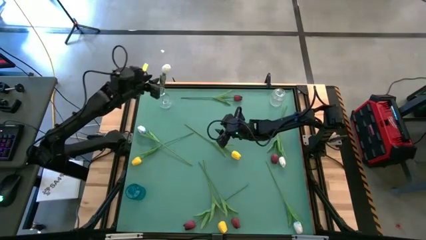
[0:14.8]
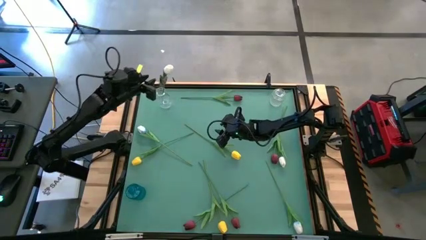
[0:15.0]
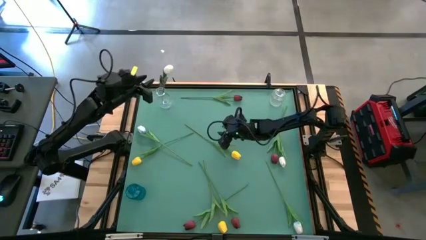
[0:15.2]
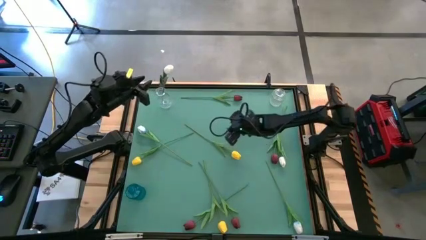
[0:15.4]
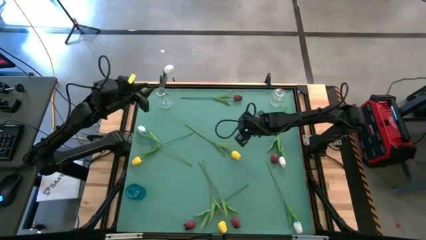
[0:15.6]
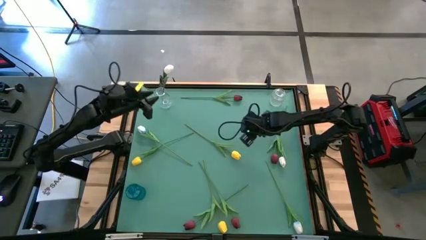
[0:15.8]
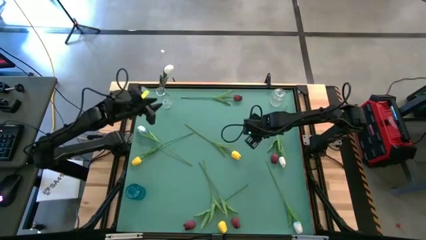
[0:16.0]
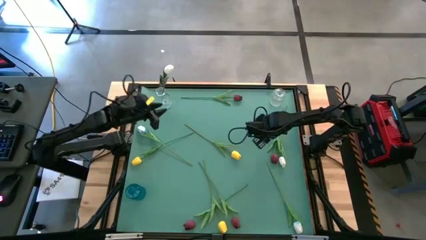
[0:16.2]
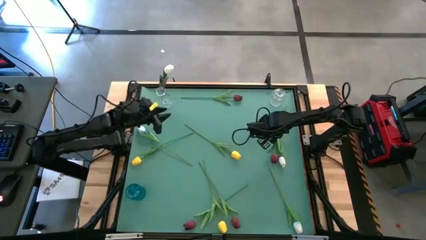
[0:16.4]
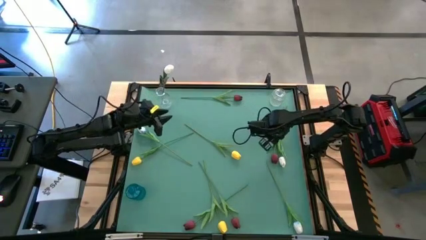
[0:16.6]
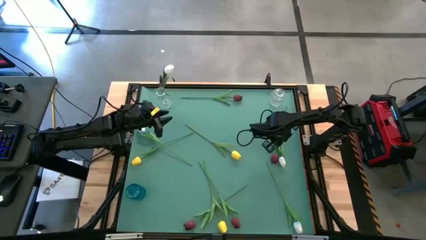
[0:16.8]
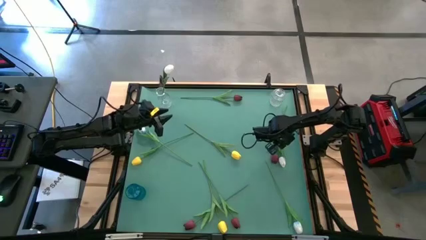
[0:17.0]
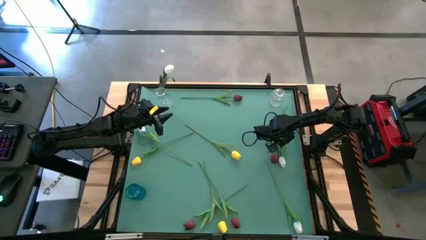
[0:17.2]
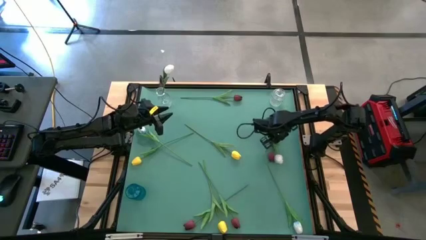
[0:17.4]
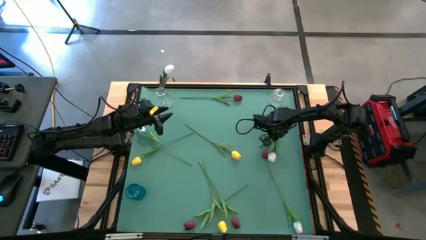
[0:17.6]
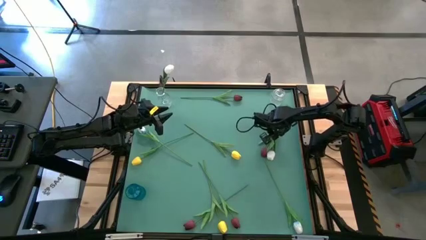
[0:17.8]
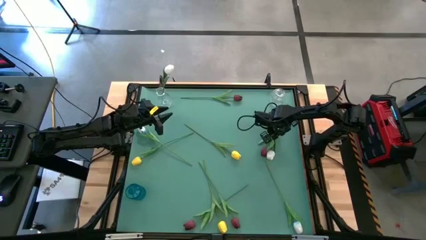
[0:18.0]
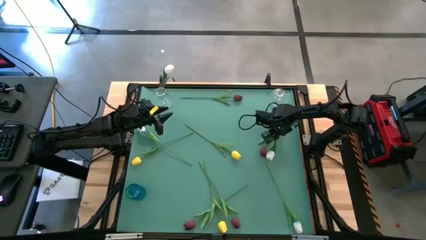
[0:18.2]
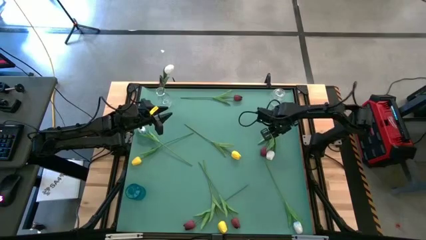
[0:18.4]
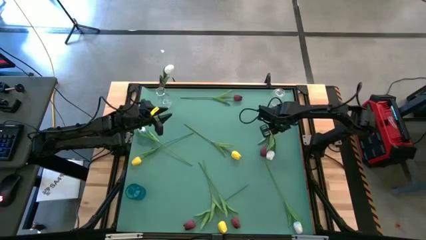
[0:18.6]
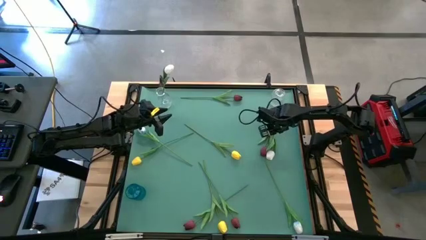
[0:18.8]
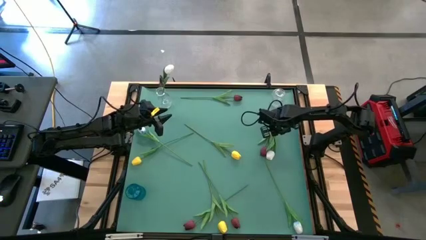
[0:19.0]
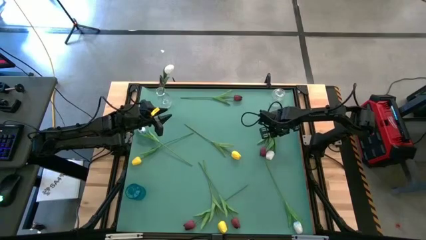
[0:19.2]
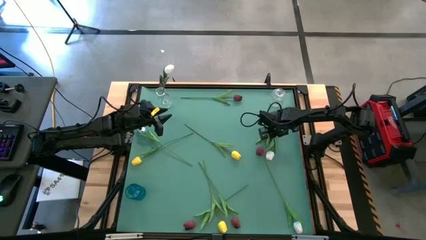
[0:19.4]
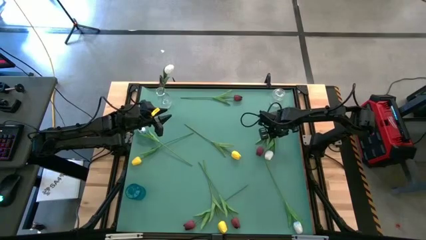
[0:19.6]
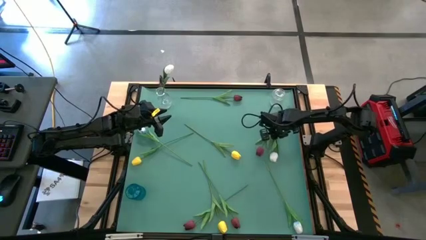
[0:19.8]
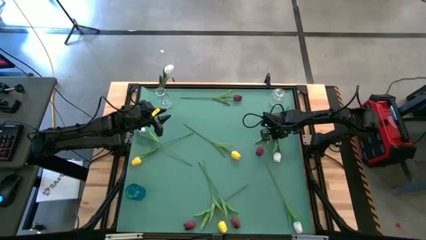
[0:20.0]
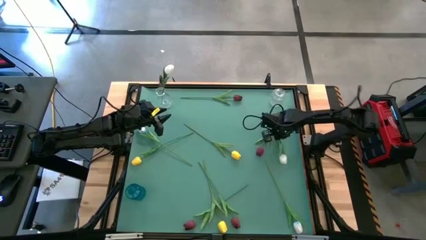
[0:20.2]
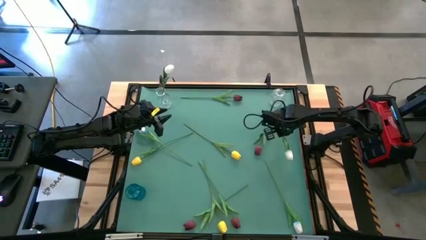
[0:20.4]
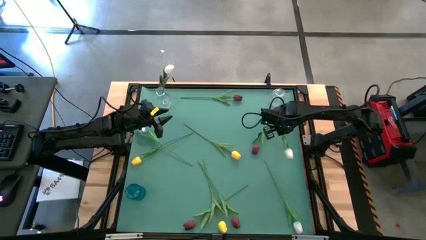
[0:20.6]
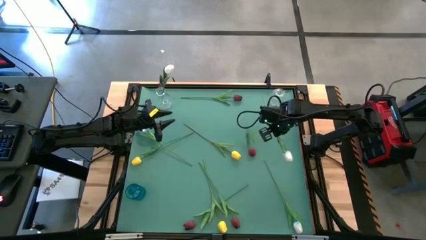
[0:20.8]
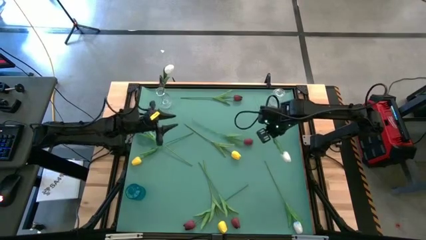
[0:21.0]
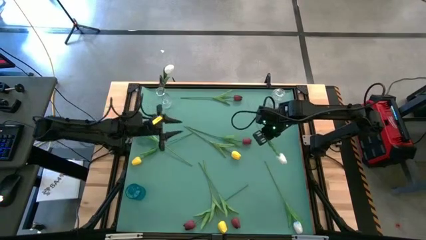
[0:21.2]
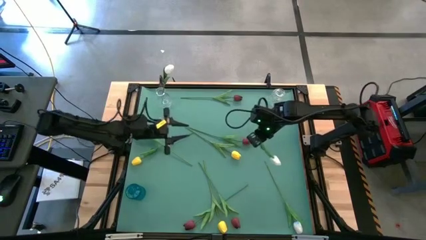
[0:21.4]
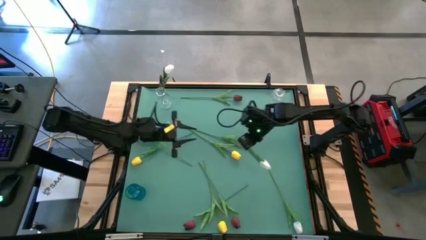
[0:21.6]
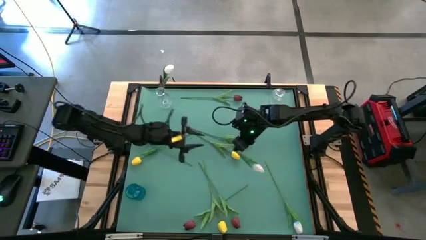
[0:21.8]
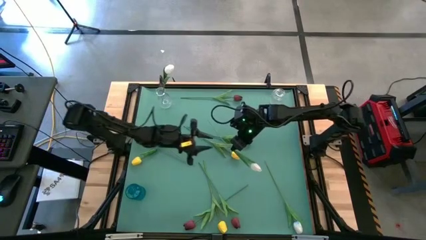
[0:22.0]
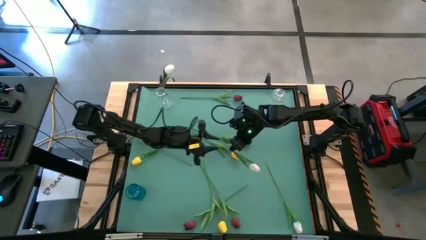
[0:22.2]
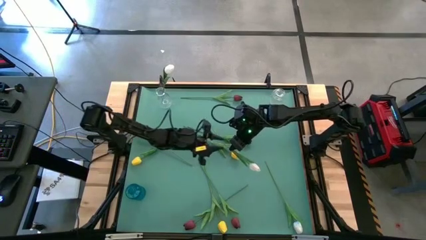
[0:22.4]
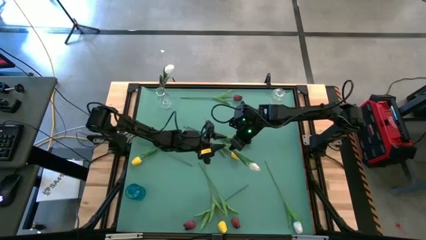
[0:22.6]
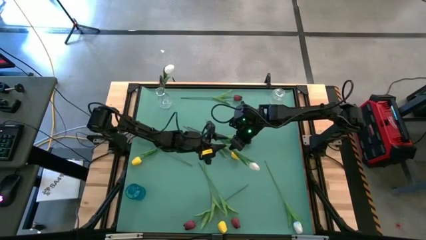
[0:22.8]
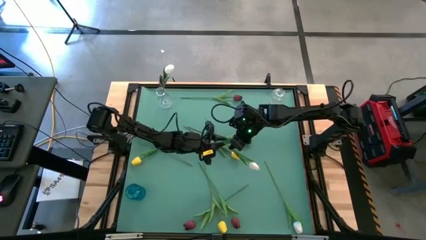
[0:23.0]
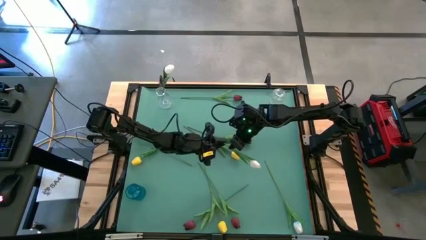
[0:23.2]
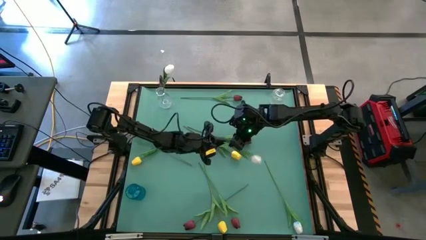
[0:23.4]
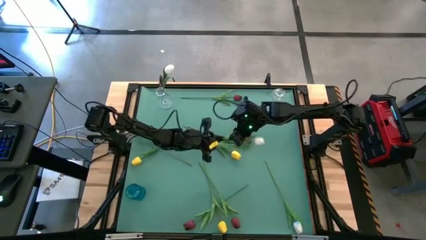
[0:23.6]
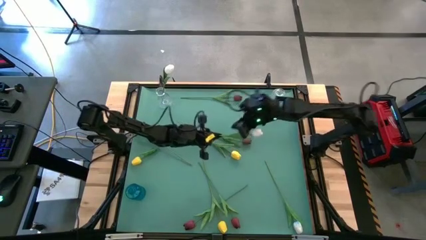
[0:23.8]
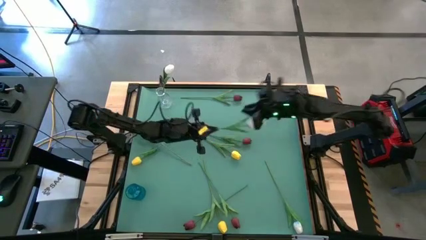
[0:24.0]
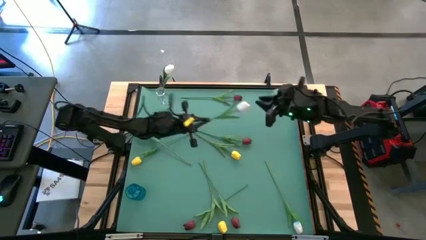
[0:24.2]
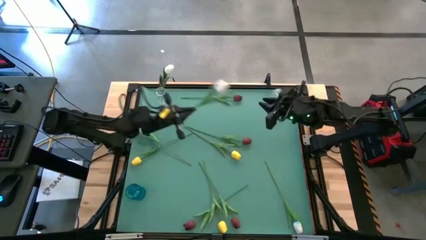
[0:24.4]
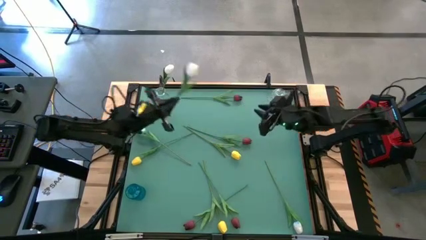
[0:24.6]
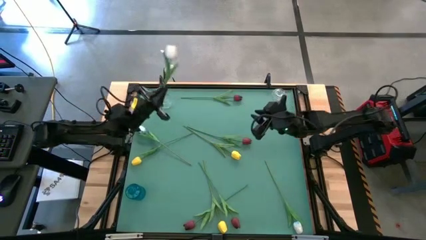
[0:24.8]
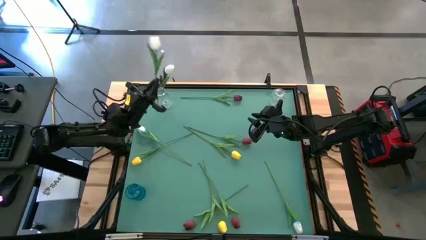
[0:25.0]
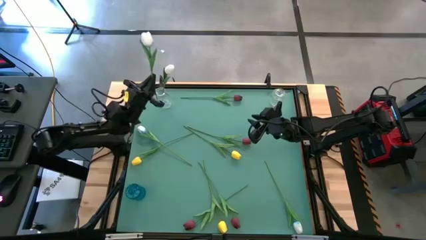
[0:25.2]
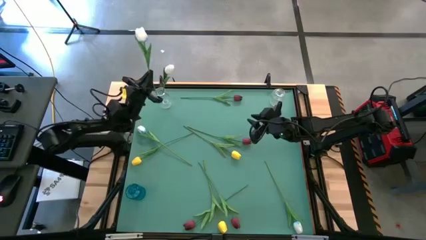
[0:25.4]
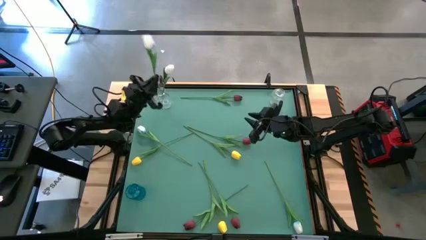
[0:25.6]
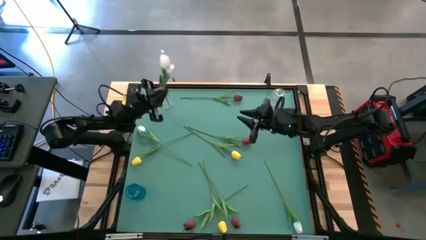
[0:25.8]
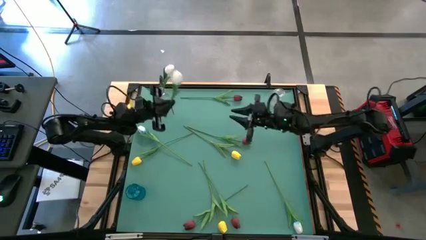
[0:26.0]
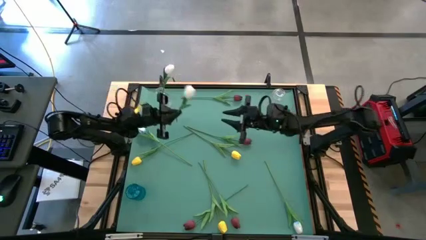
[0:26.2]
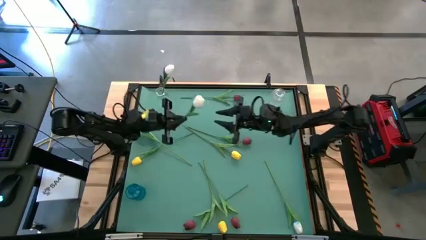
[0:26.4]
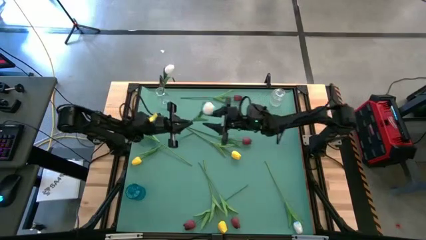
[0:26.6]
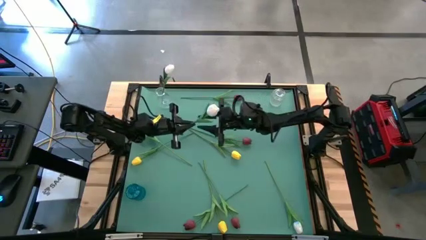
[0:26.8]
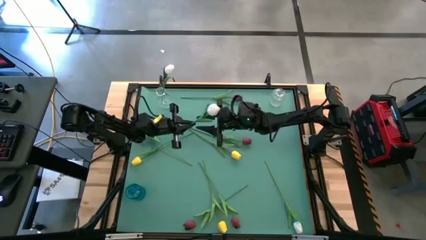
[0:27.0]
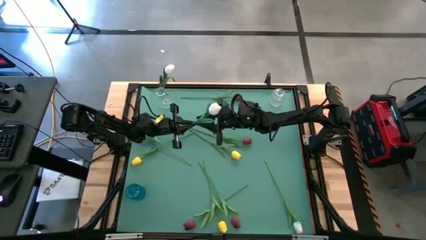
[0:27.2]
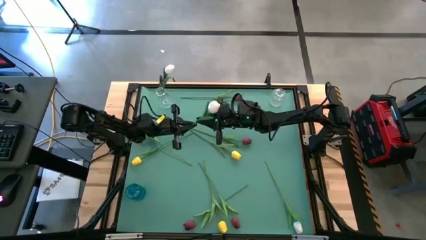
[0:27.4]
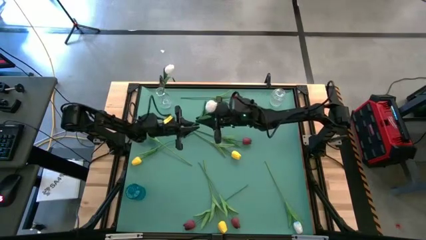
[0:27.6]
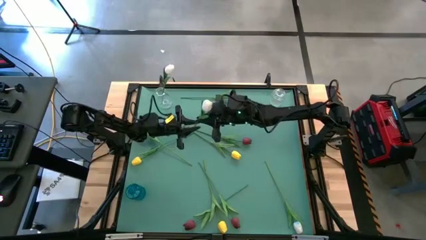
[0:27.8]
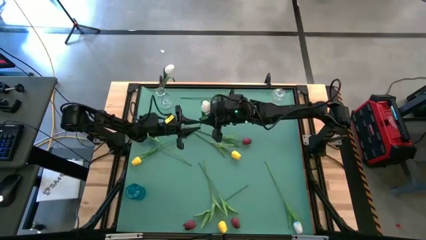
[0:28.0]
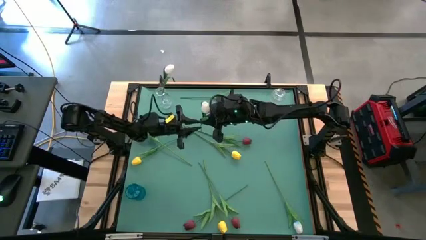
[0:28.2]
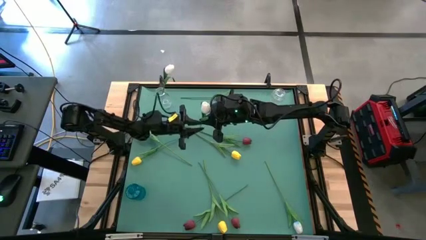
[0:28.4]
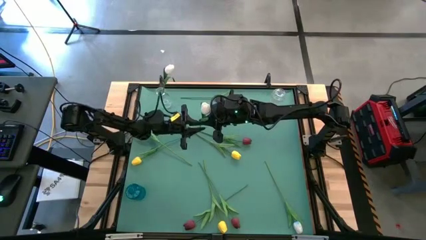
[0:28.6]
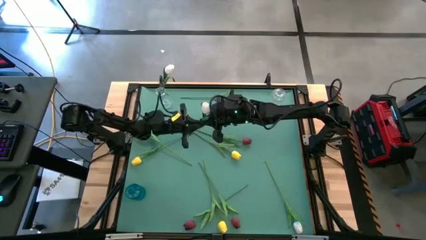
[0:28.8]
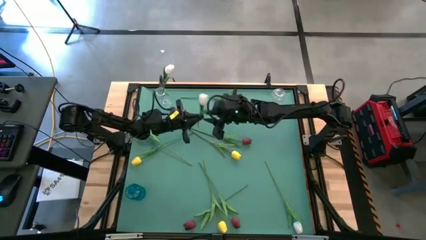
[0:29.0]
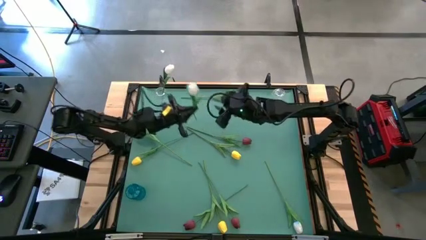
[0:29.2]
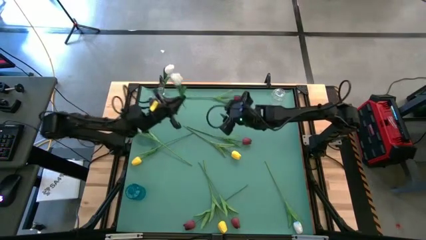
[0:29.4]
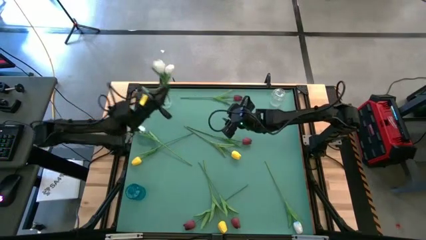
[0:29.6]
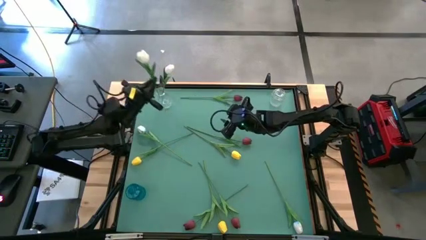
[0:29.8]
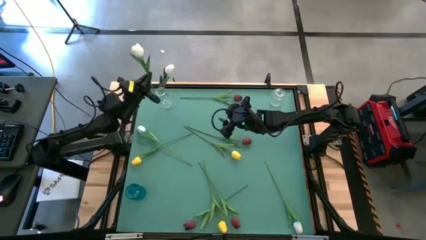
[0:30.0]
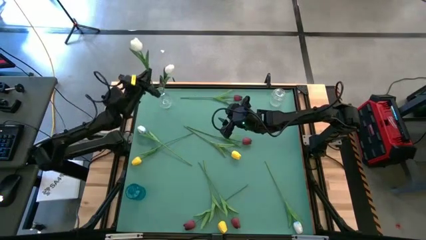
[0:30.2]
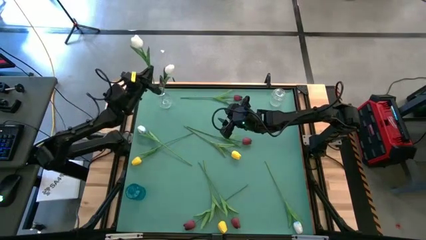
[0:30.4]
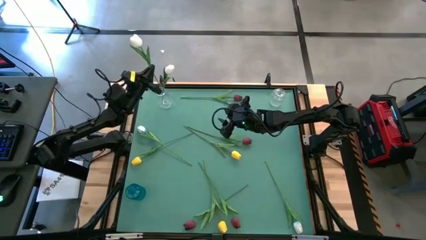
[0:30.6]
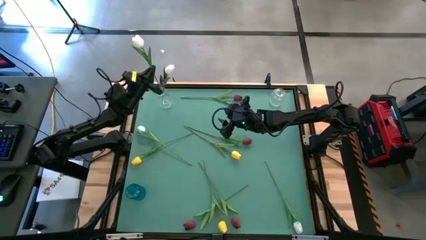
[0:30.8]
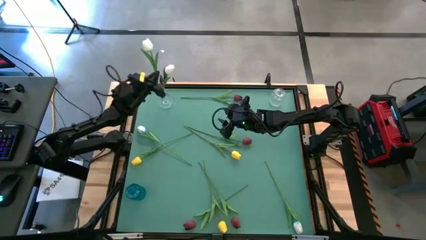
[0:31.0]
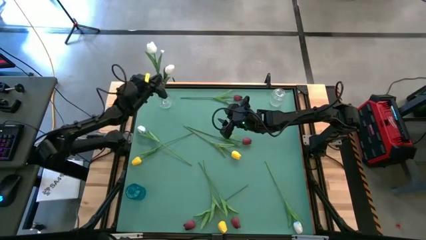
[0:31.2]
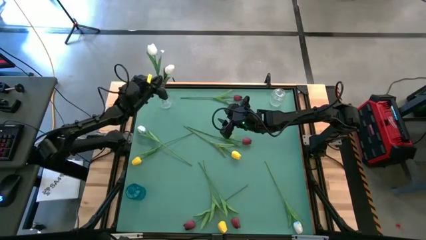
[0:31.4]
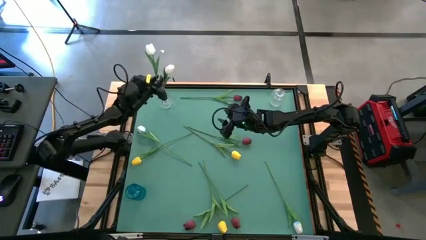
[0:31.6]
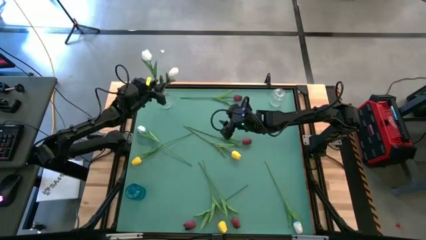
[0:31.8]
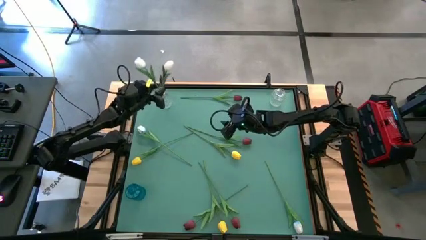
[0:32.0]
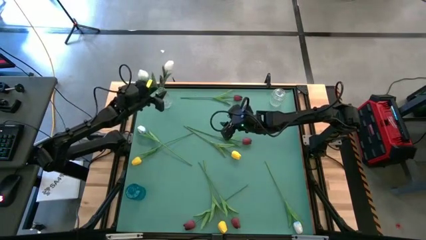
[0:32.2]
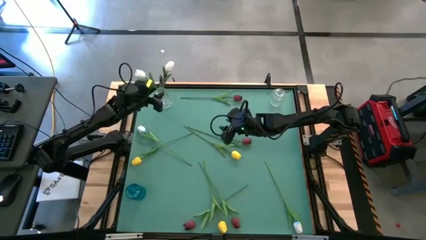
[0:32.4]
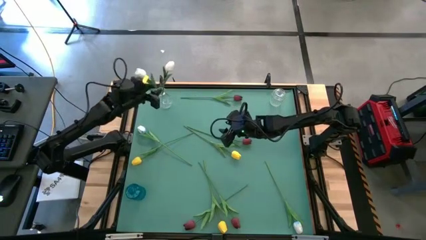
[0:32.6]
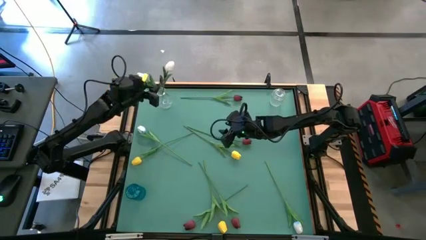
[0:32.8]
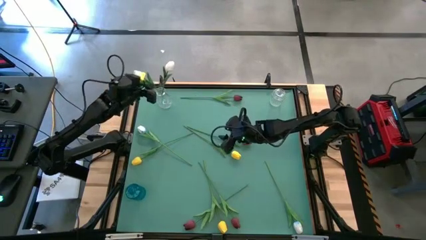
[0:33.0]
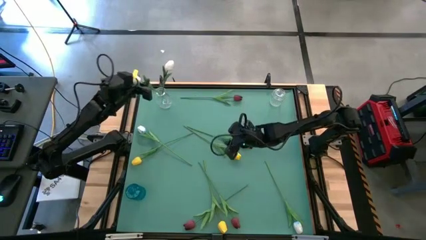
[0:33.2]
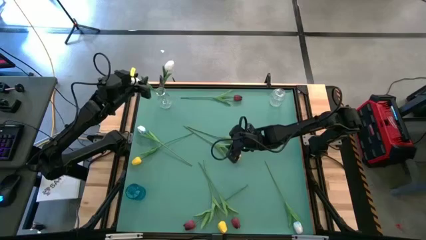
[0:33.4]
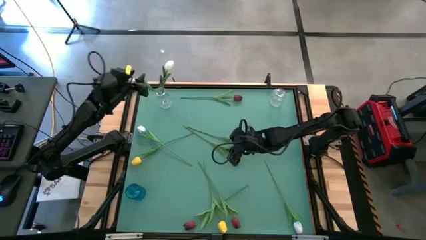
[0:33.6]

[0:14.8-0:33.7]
Task: Sort flowers into vase by color
Put the white flower into the left transparent vase
